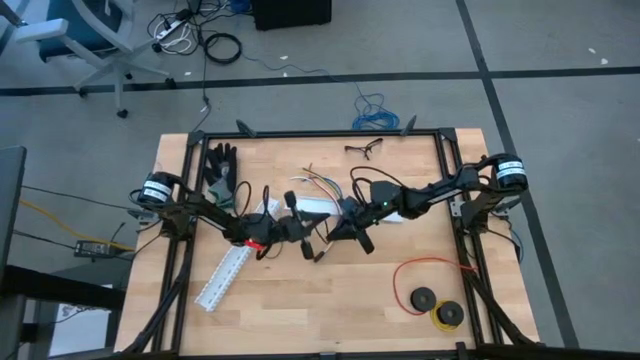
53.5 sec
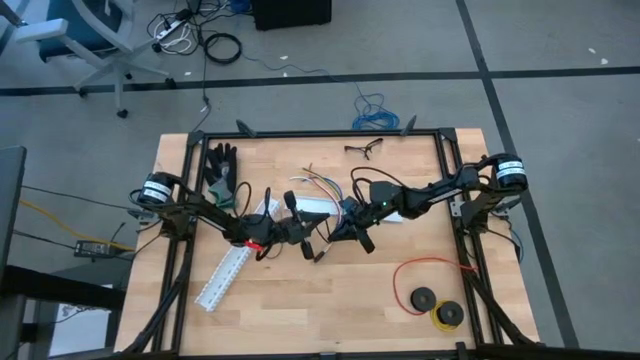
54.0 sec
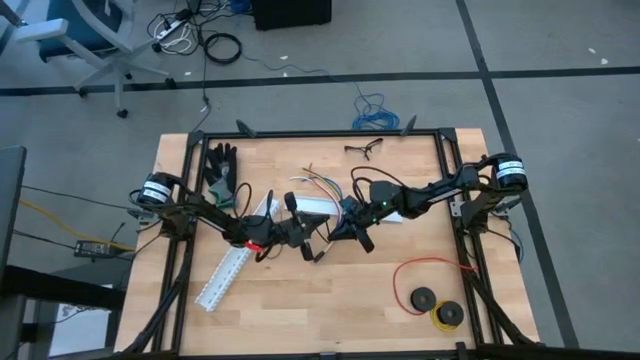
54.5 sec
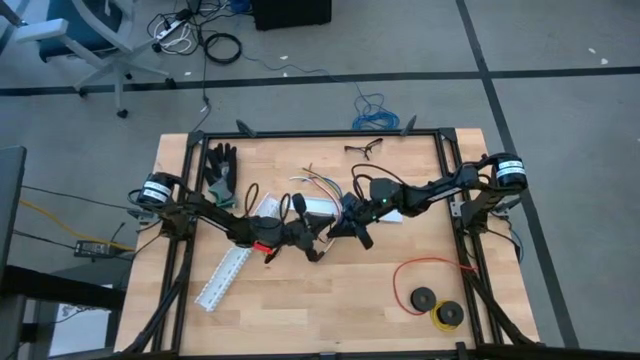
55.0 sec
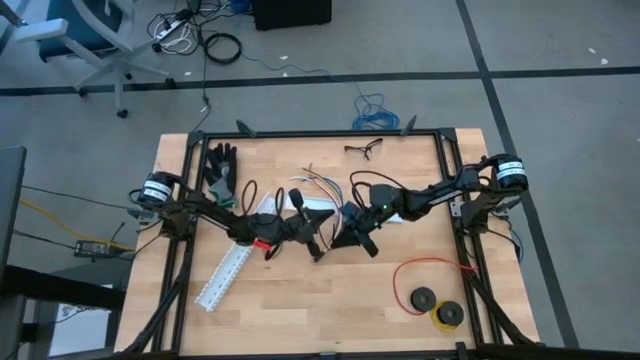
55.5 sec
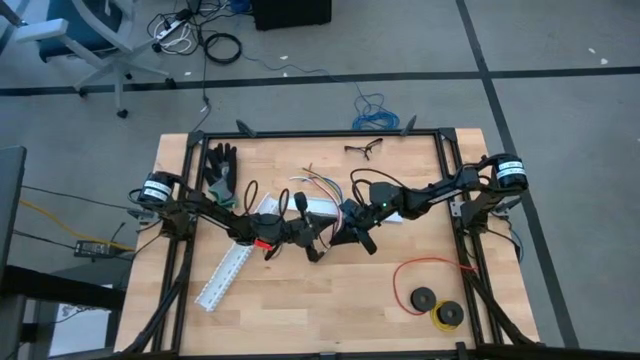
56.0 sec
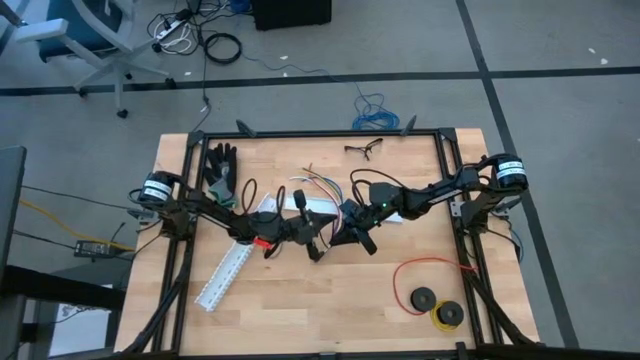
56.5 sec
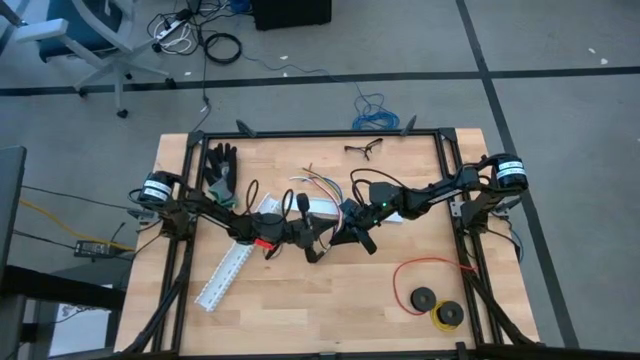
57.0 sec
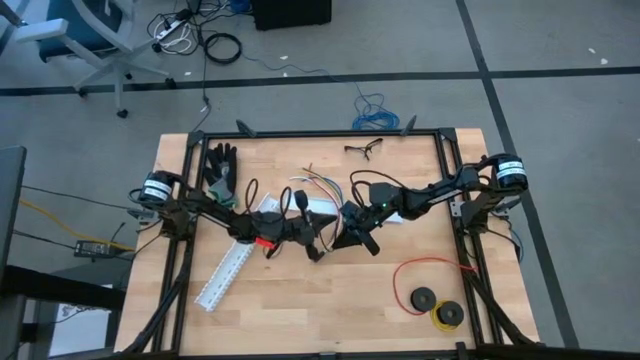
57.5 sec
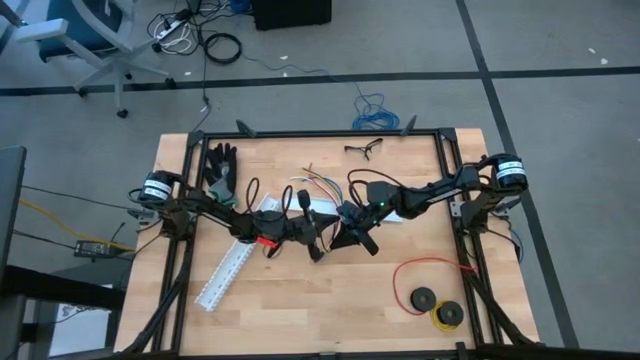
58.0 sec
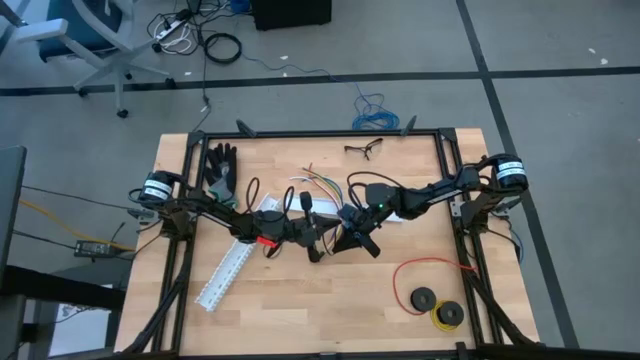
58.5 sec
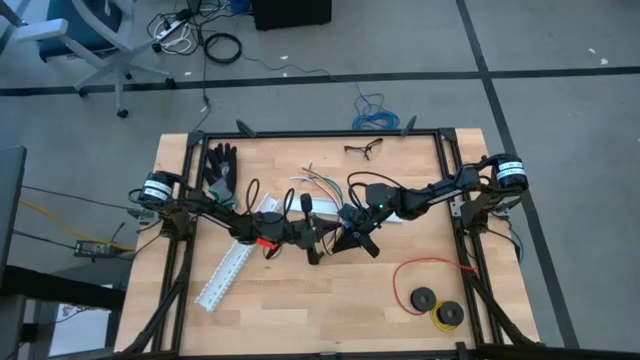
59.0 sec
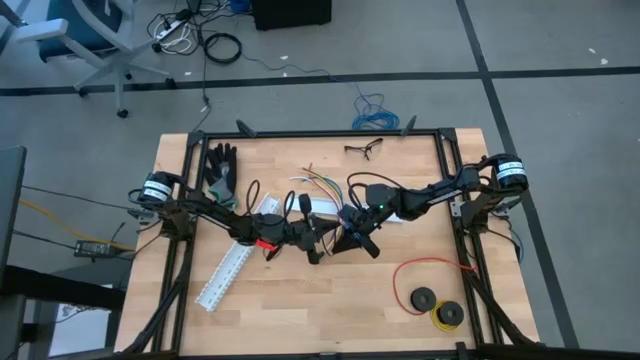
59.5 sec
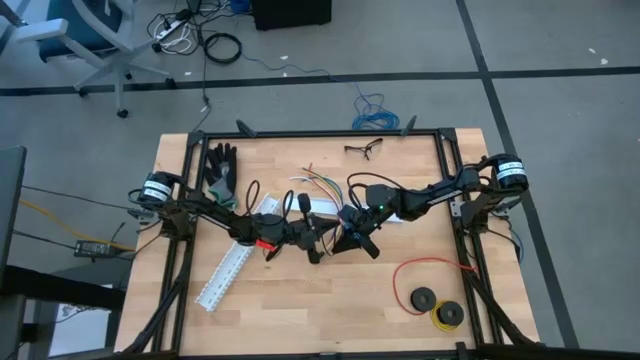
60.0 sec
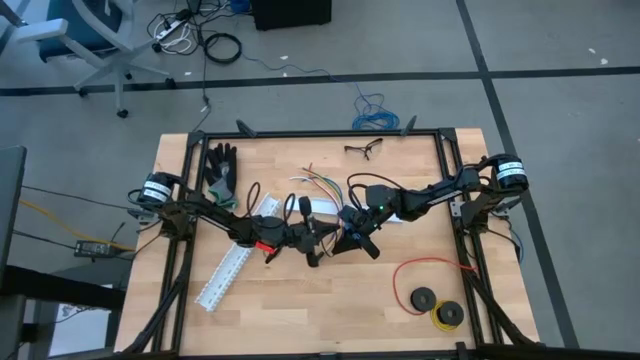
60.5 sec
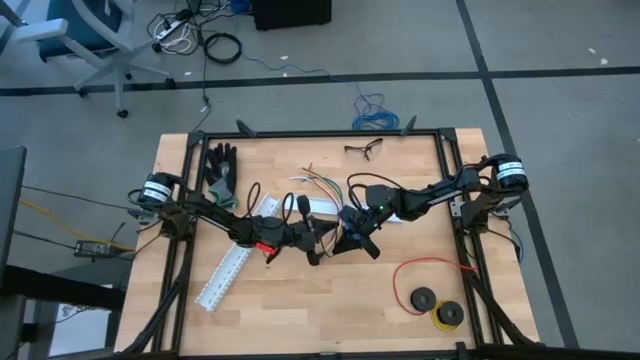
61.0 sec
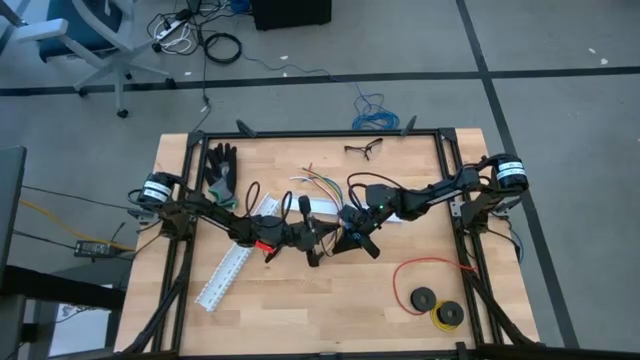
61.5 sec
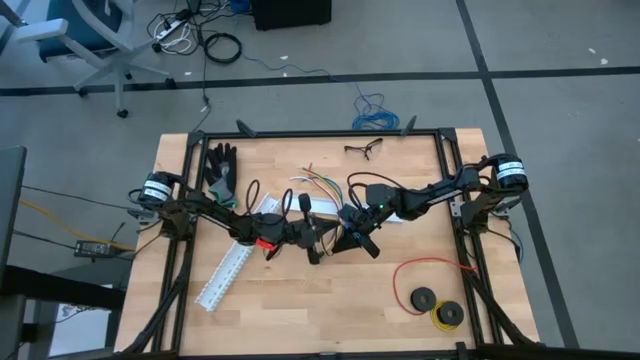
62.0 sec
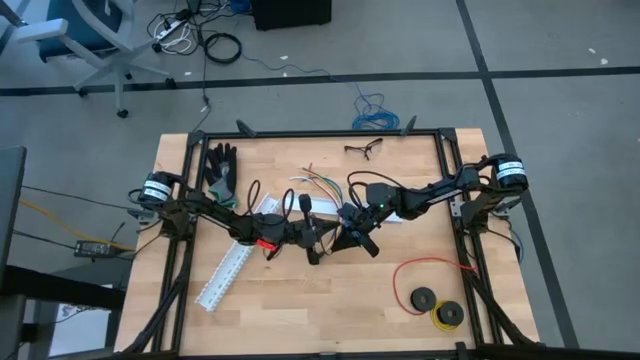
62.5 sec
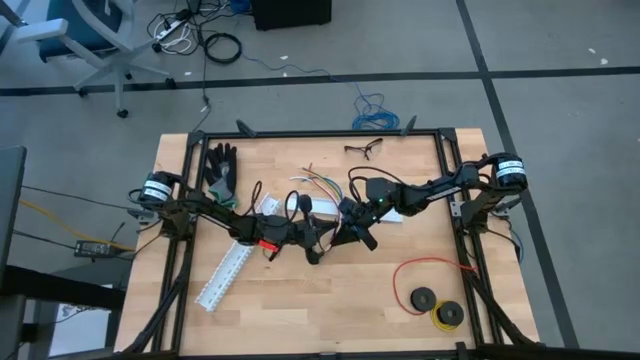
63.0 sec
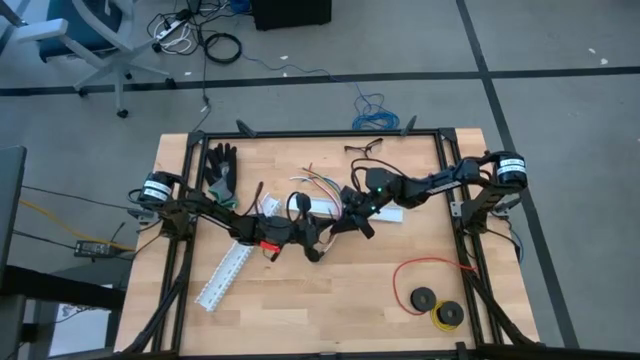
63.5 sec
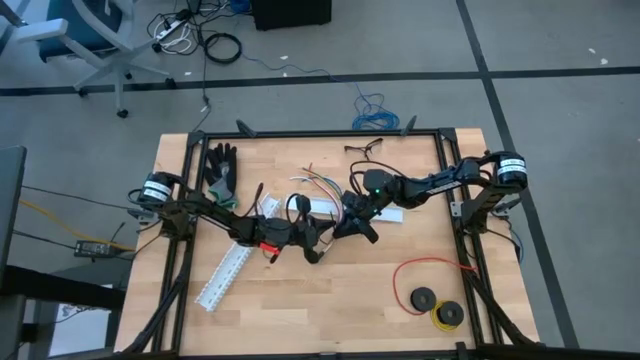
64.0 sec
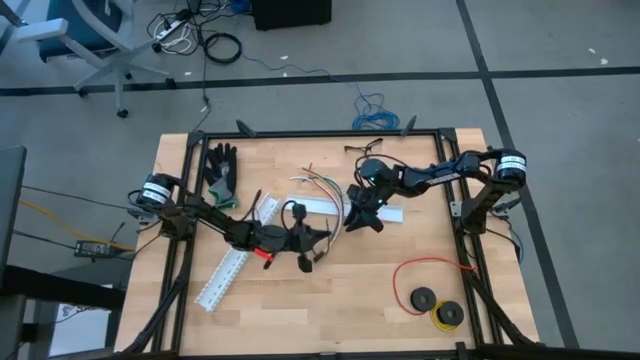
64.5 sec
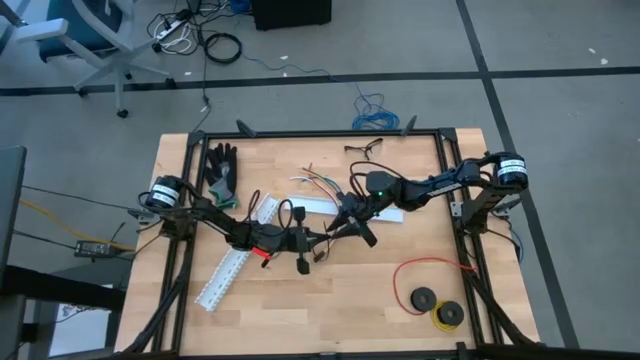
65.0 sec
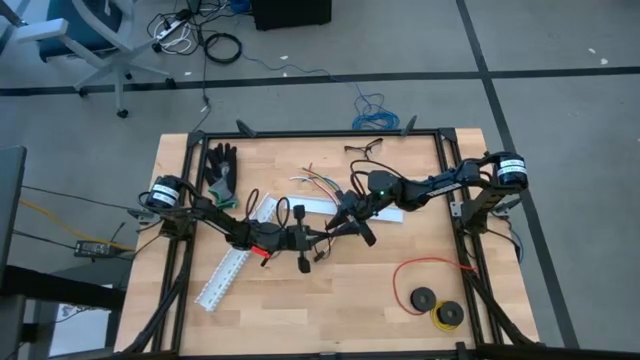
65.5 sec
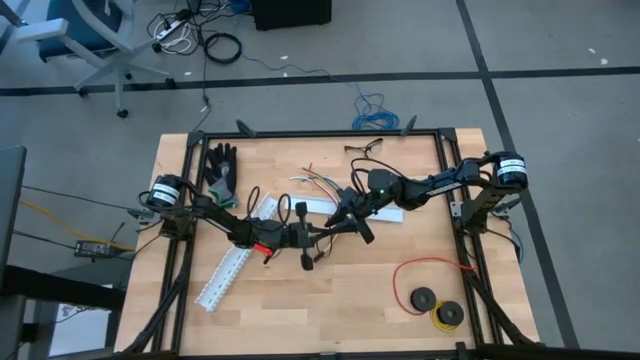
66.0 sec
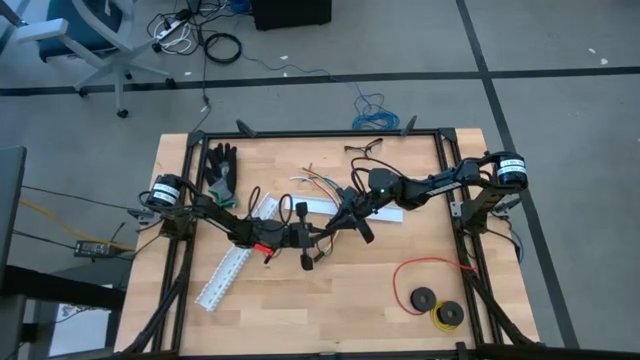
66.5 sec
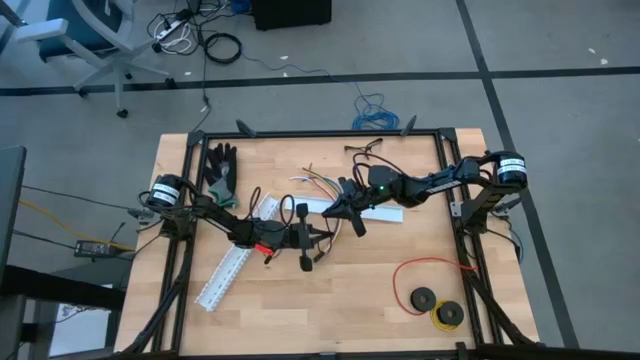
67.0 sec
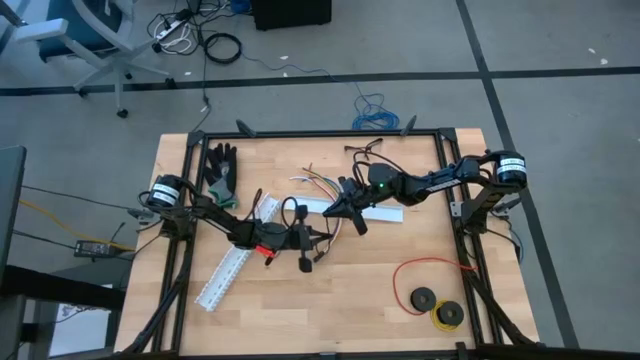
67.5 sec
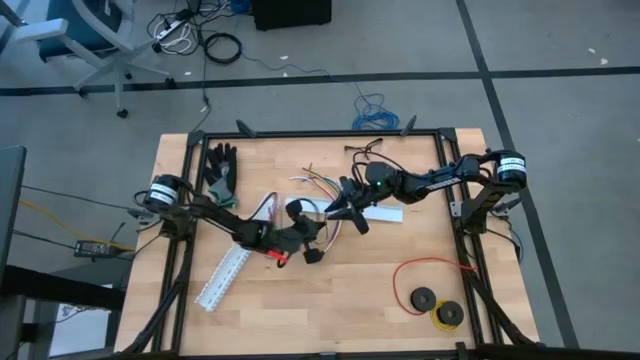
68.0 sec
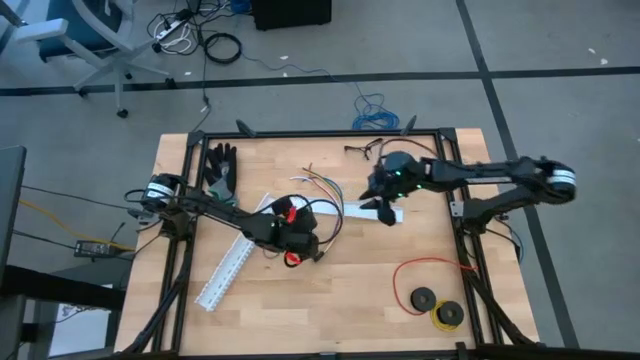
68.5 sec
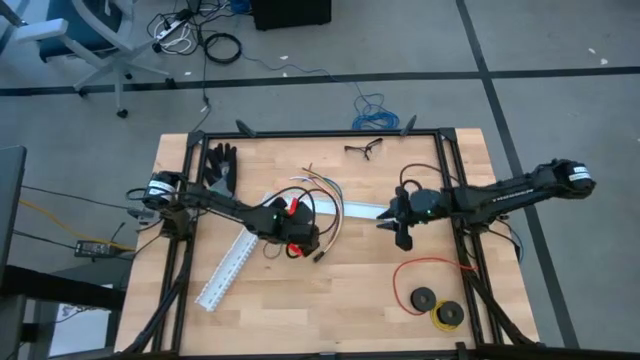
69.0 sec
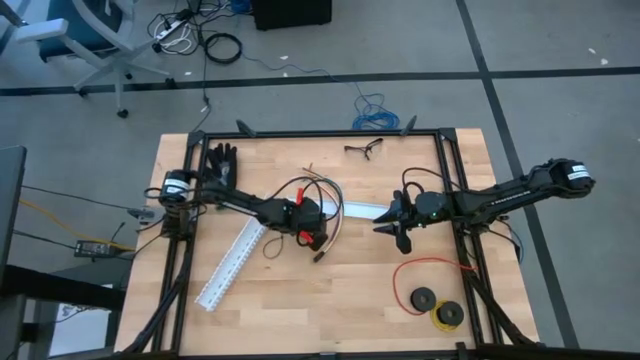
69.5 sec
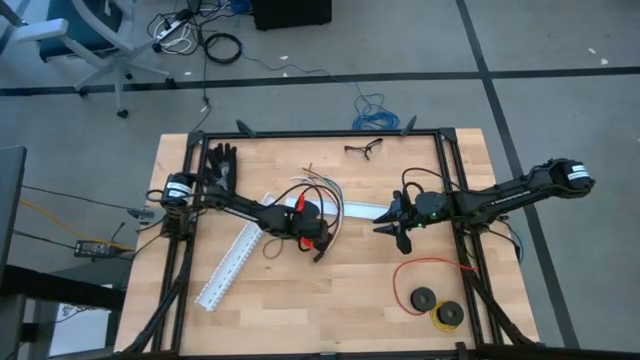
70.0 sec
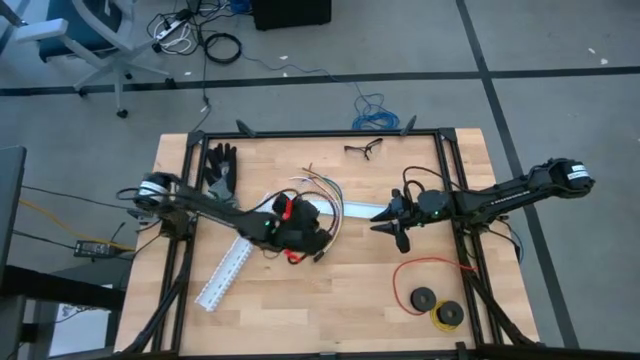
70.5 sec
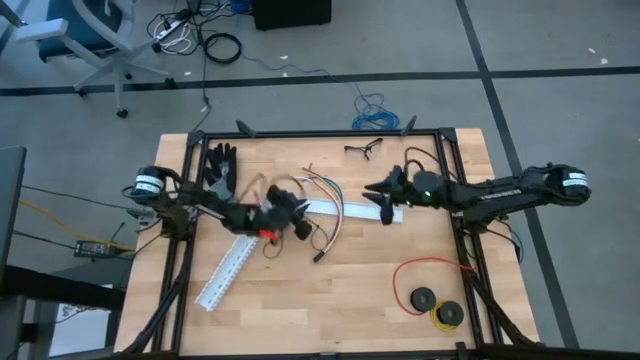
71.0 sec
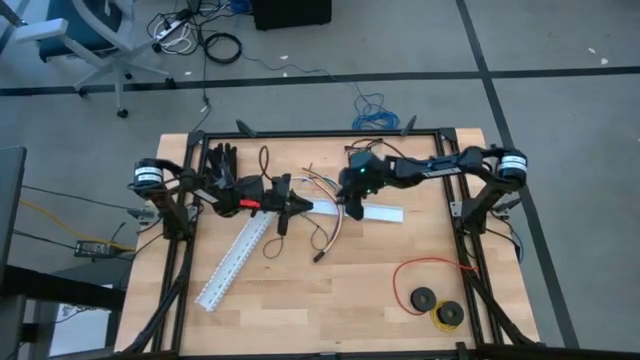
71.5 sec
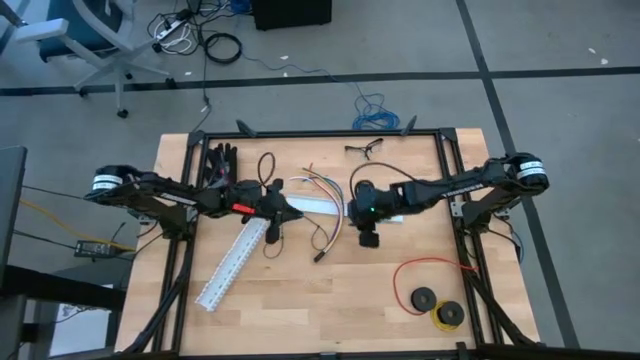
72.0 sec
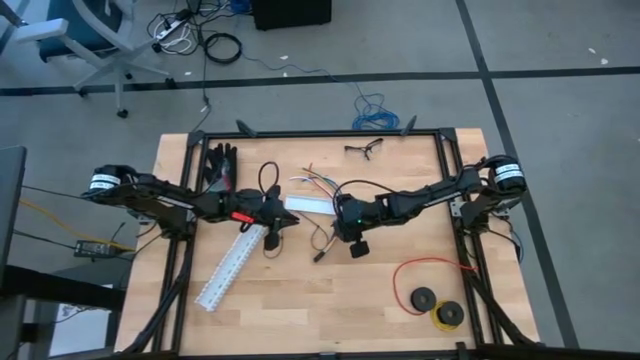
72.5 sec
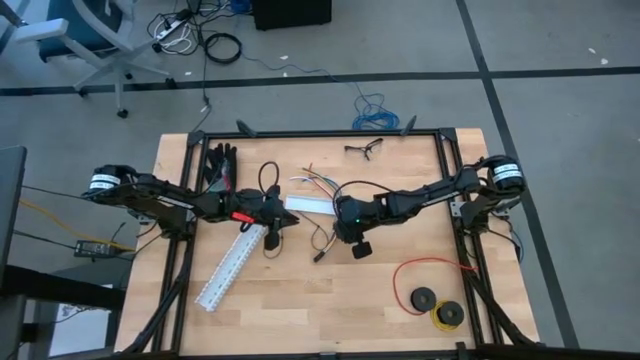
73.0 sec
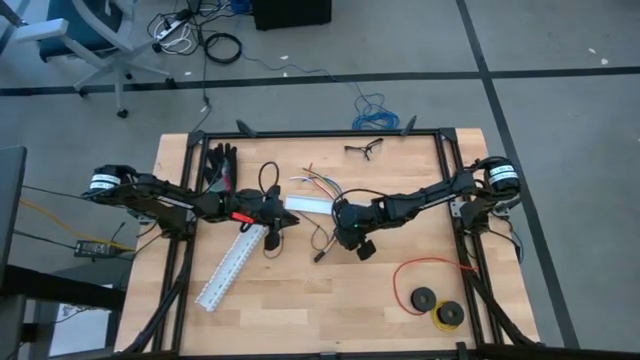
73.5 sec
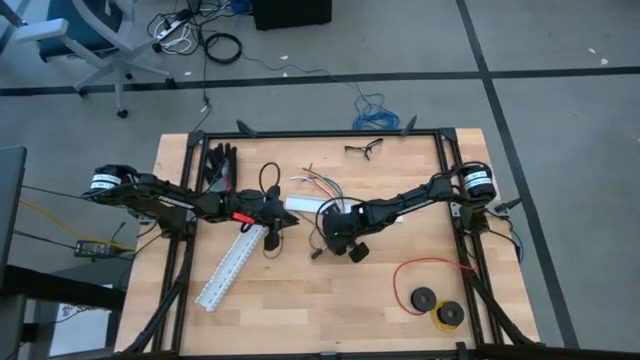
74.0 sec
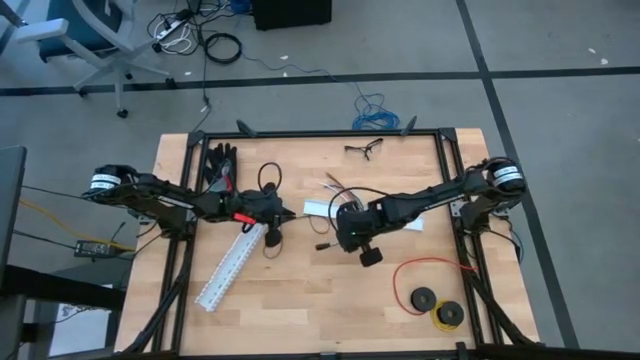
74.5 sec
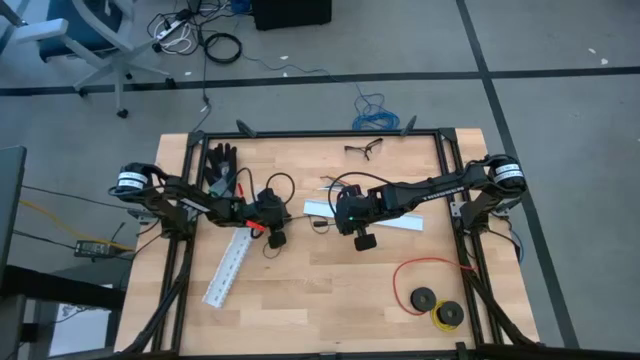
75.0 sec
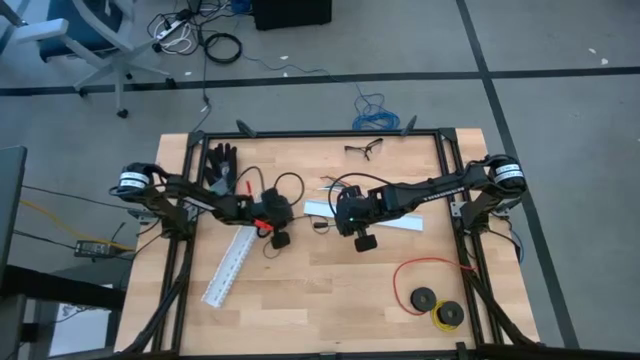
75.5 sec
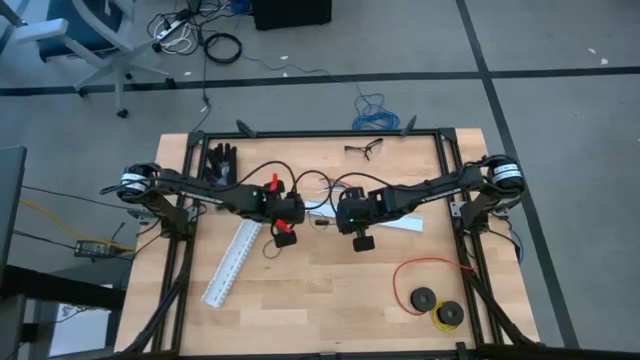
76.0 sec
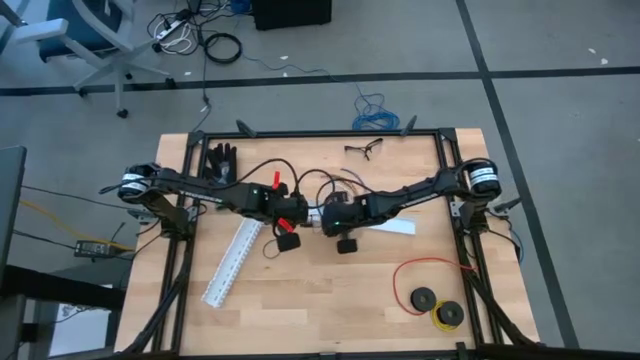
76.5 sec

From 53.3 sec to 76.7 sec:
Task: Ziptie cables
Wrap the cables together using a zip tie
